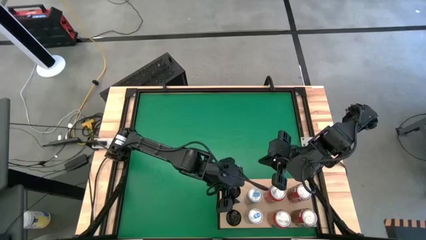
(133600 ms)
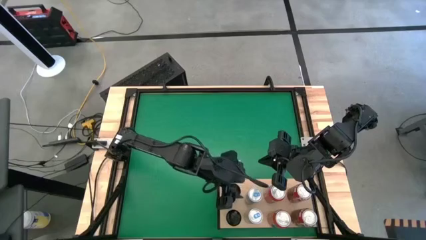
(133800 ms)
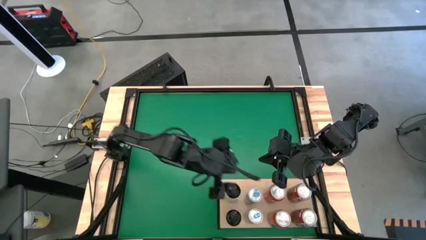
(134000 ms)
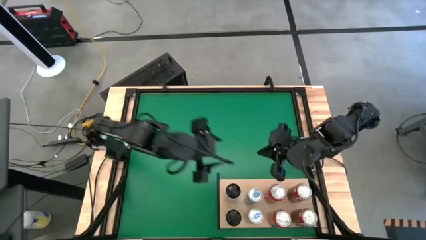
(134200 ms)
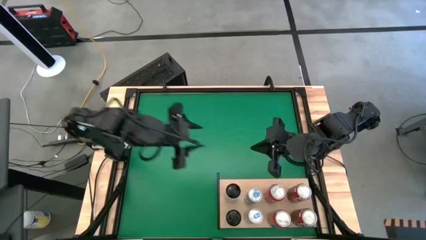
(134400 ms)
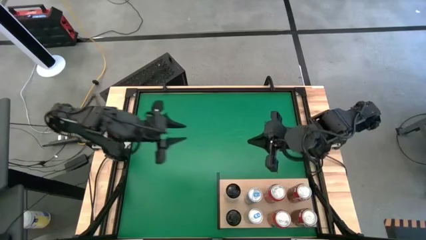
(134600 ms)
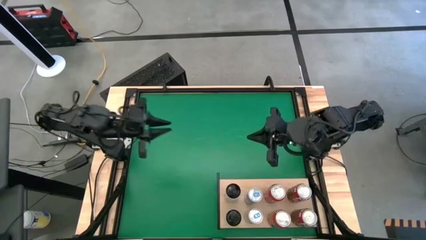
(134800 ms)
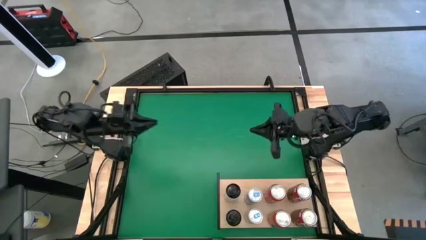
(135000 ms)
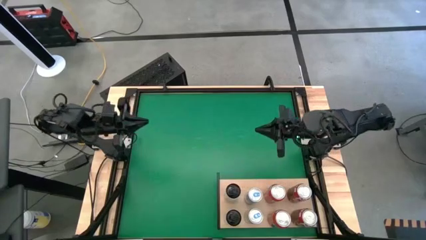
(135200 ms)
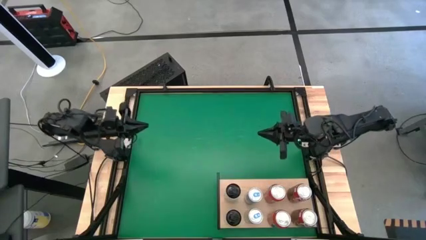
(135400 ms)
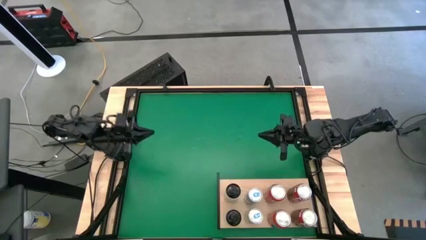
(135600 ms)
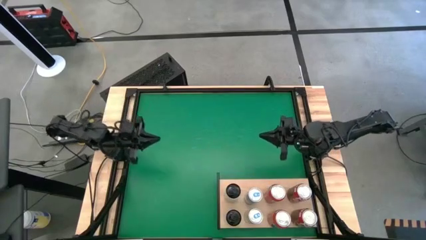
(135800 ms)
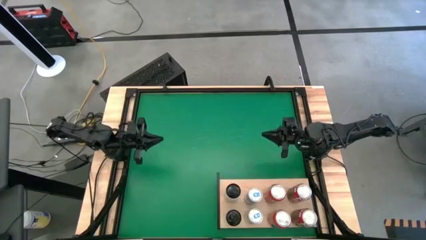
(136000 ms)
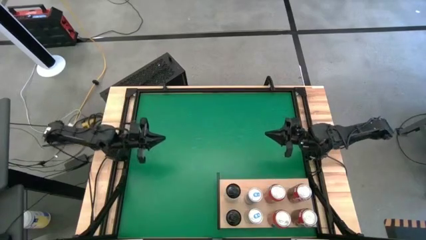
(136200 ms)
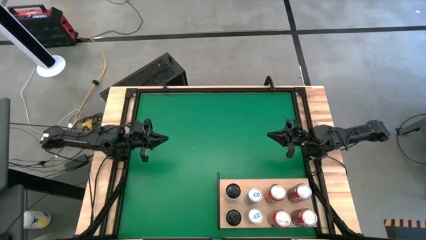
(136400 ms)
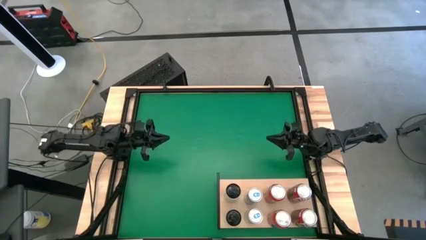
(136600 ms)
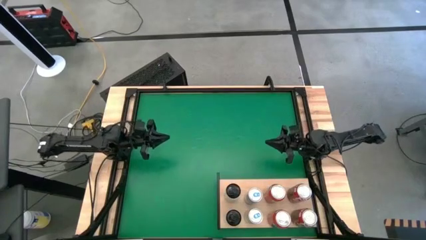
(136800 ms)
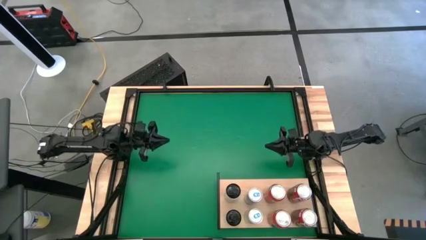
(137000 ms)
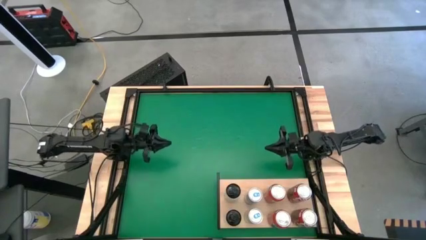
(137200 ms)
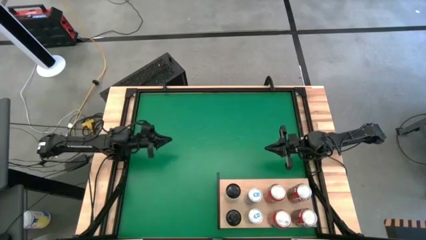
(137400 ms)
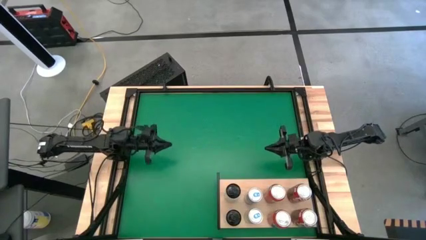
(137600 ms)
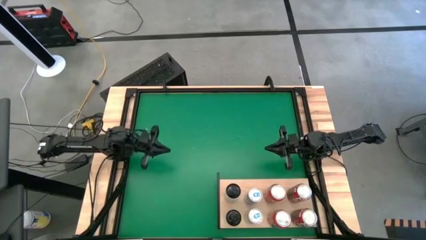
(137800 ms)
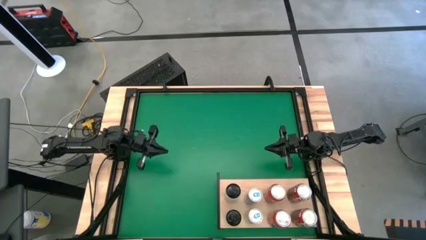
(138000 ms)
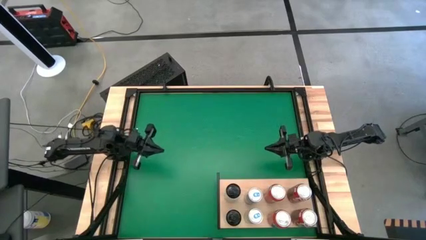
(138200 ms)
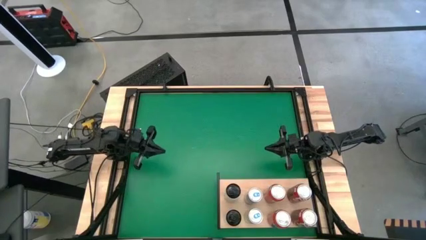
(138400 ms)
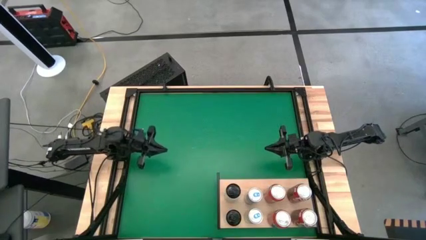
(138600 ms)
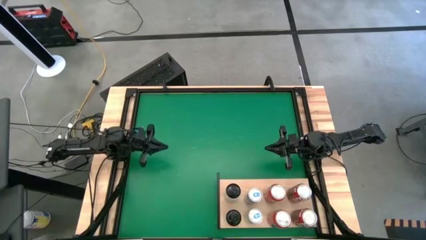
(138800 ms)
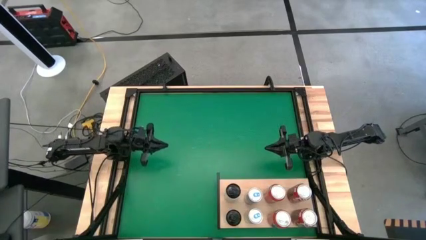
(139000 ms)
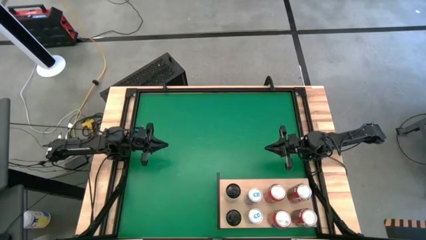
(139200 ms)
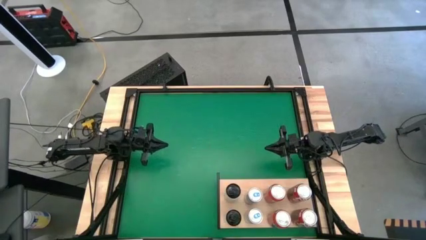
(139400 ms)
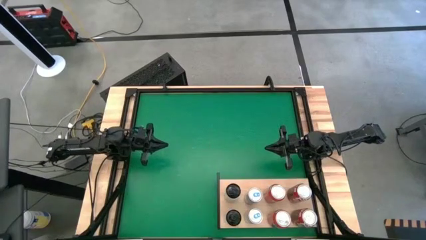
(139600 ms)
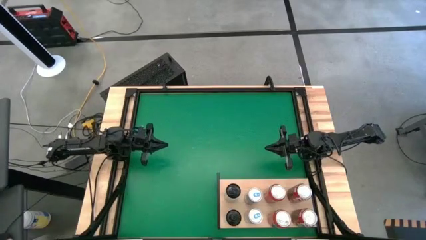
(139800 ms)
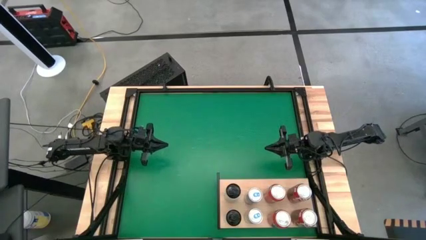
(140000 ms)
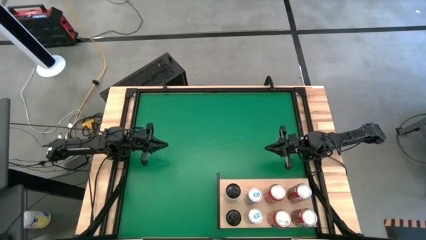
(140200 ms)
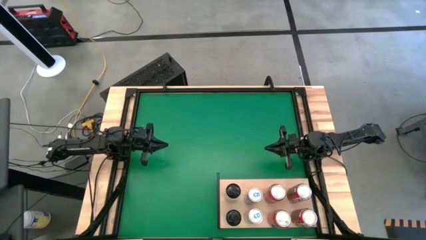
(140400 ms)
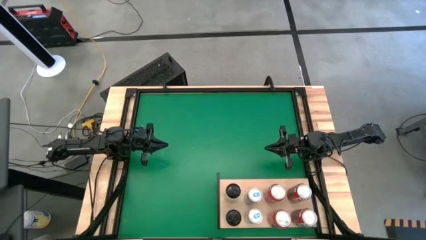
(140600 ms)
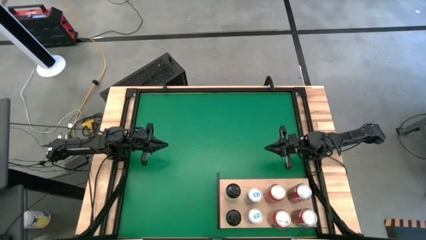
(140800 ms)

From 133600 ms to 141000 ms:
Task: Place canned beverage on shelf
Return to Home Position

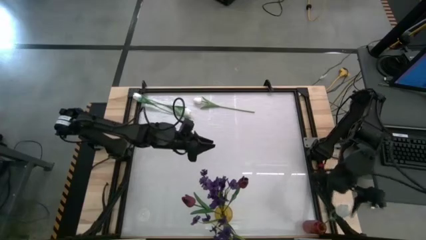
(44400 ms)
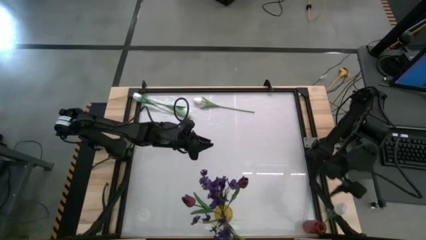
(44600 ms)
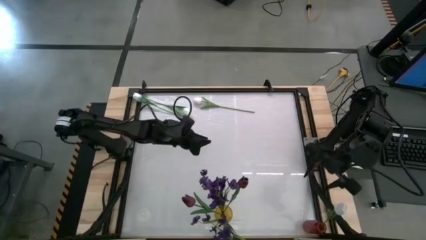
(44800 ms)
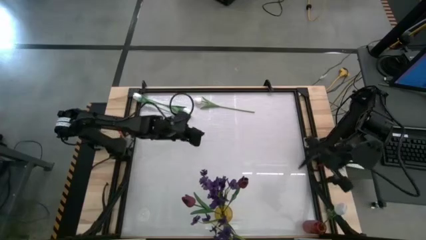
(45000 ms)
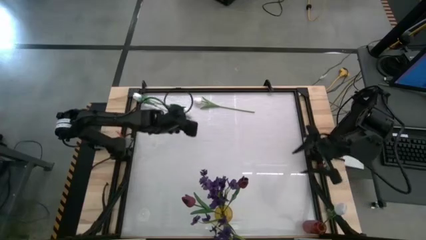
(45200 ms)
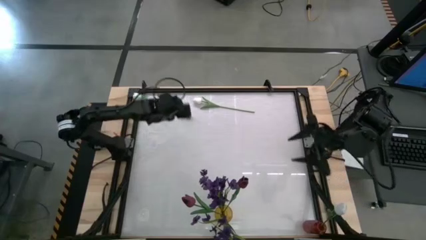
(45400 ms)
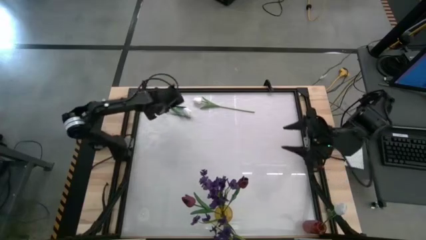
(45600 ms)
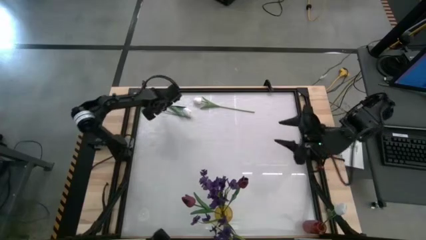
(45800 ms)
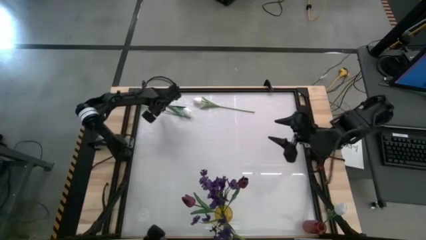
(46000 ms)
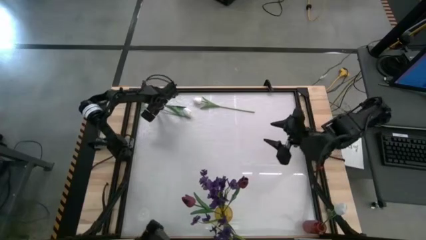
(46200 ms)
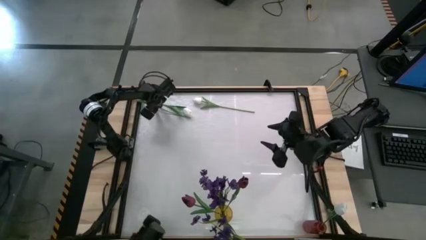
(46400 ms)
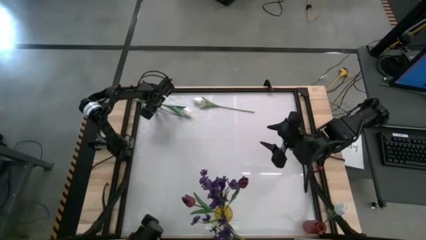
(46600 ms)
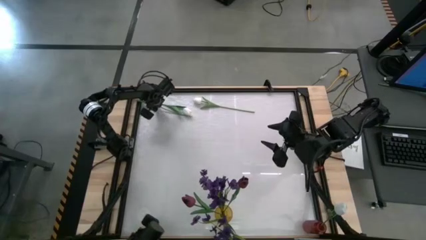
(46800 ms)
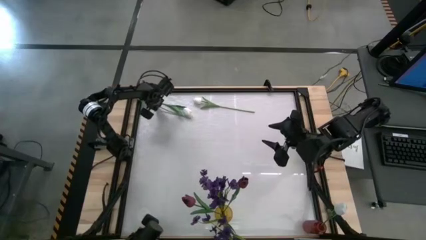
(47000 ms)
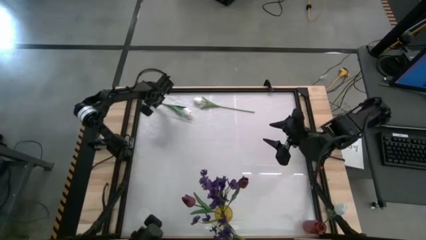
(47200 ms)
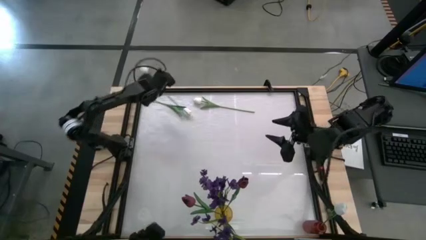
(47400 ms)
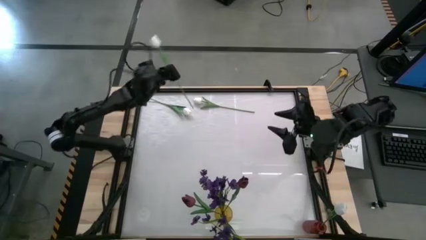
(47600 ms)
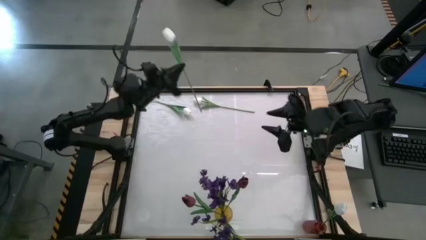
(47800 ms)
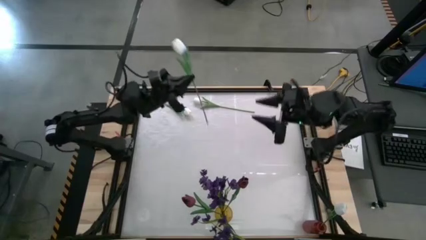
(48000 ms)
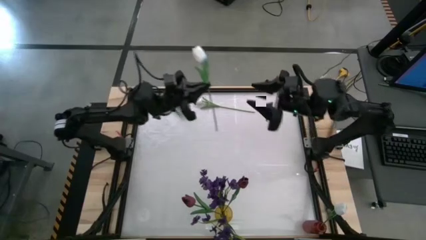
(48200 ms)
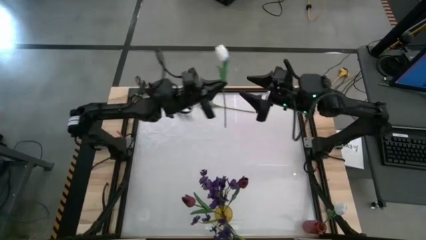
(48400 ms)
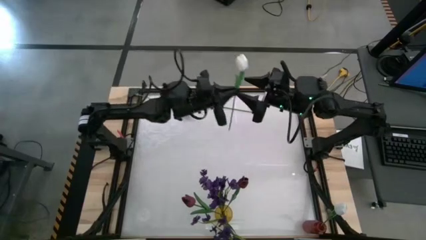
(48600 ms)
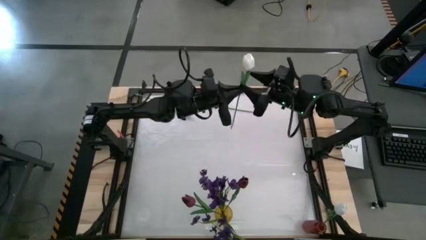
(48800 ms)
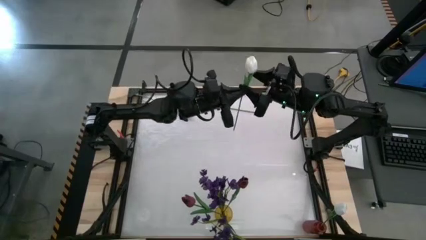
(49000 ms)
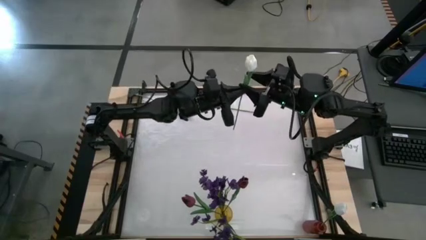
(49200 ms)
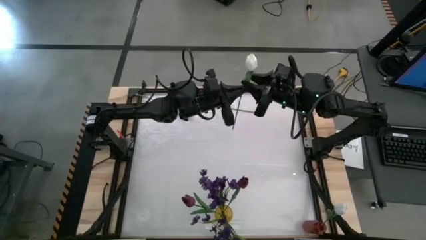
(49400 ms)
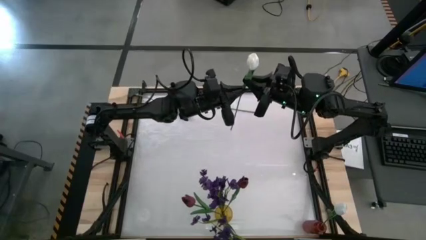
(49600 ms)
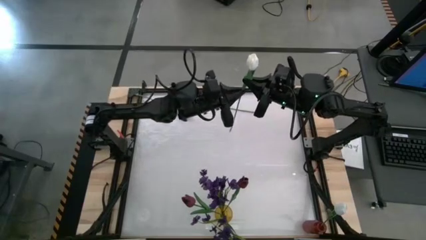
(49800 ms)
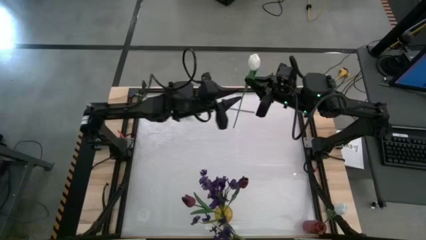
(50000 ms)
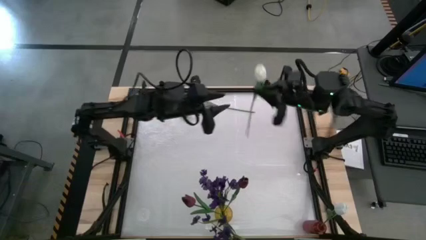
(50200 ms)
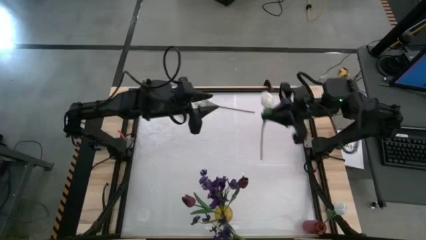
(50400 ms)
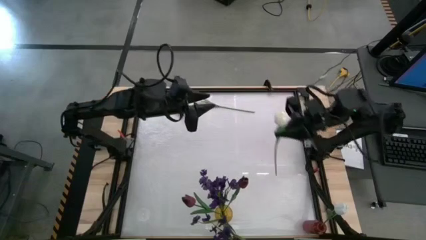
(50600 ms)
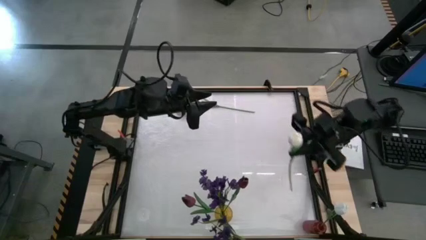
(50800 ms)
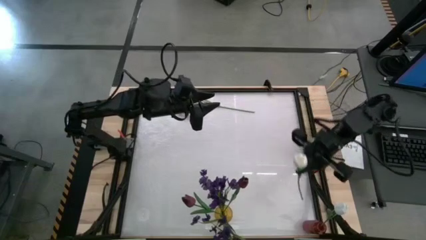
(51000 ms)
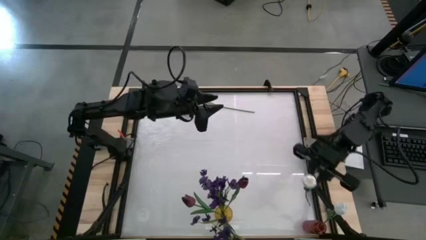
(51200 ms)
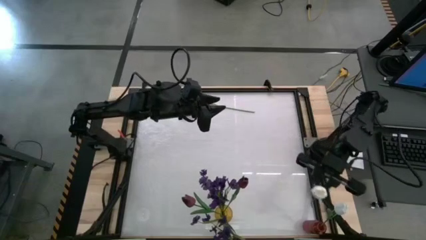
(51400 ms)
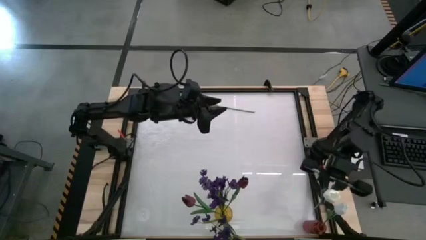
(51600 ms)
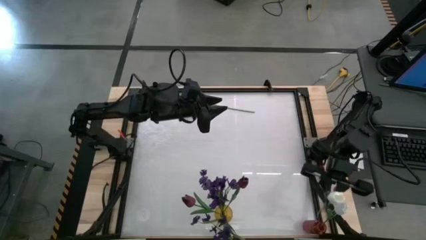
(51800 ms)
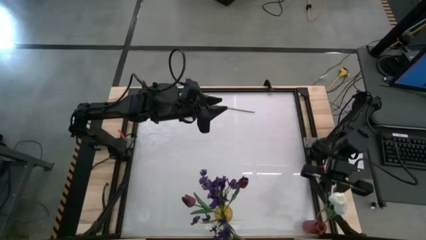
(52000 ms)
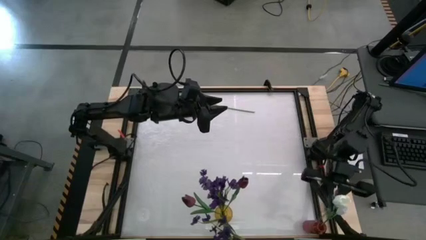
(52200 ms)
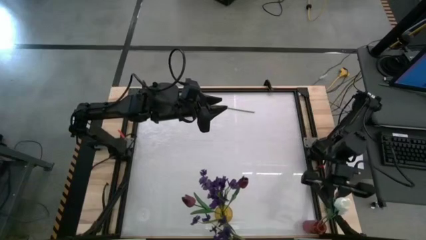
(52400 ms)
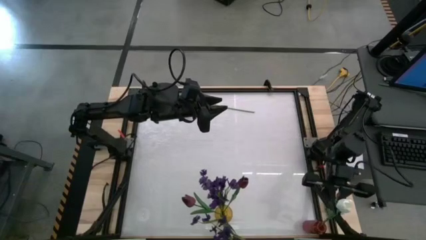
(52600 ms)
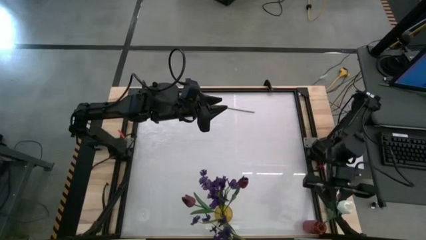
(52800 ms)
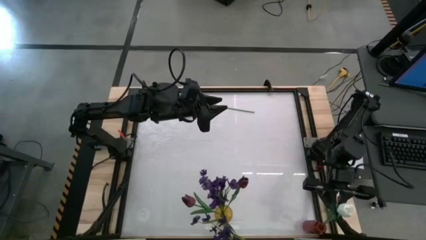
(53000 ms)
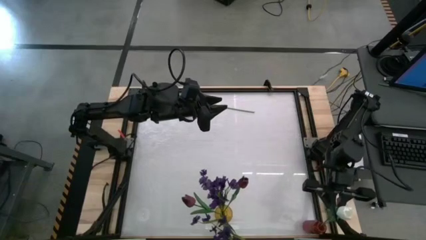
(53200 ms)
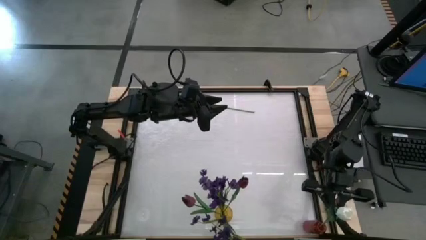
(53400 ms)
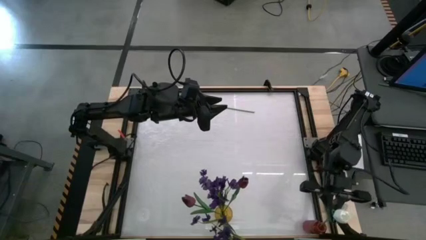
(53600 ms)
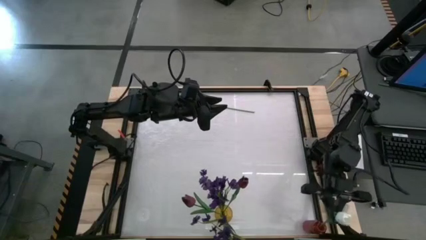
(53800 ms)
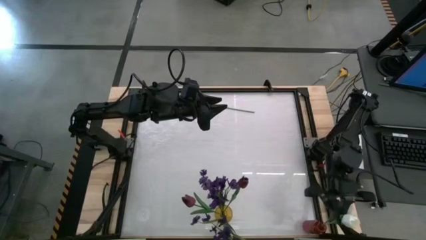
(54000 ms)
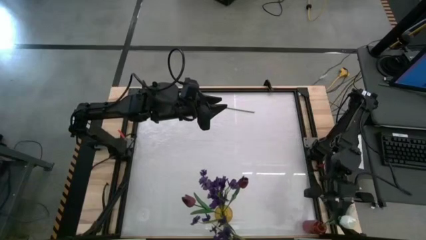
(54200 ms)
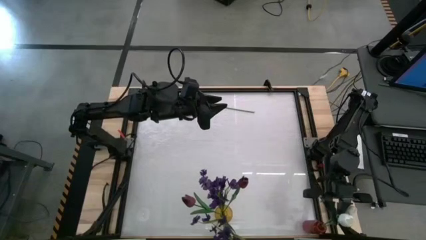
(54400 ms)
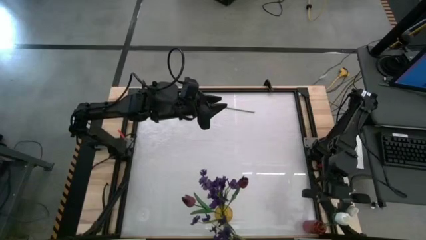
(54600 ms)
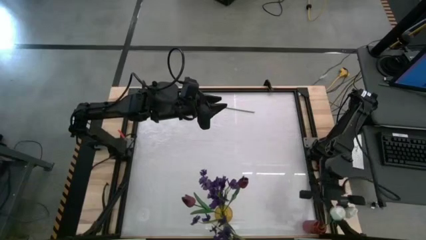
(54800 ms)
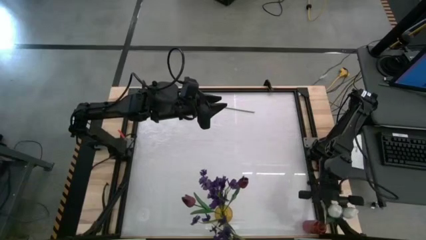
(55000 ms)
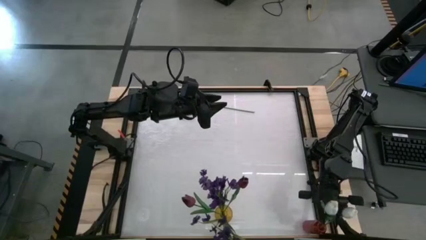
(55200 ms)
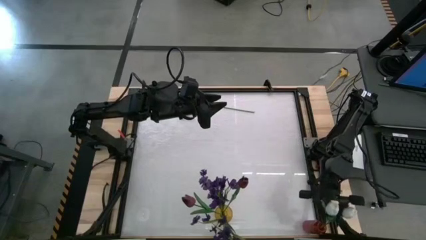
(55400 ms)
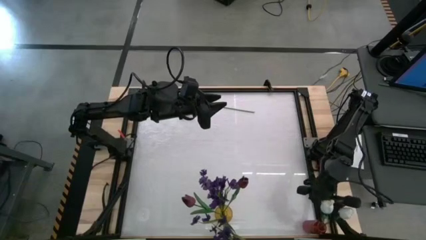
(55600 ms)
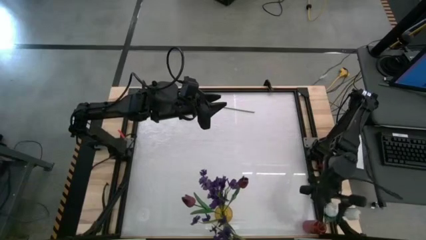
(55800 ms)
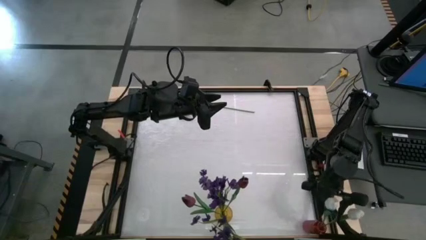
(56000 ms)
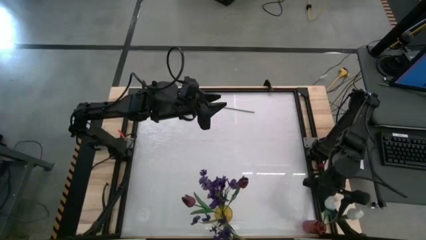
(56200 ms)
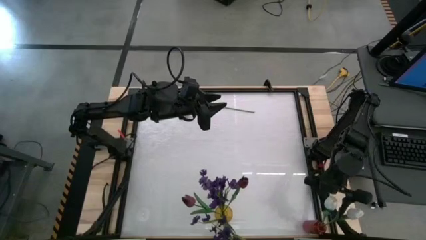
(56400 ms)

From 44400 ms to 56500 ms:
Task: Sort flowers into vase by color
Put the white flower into the red vase
